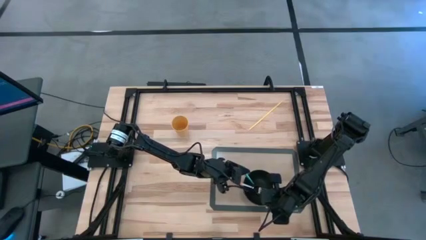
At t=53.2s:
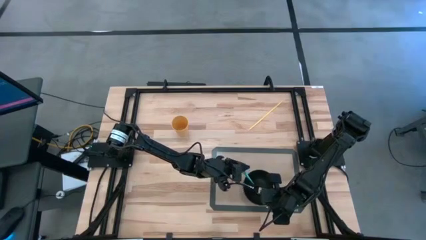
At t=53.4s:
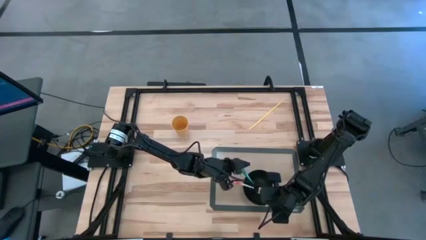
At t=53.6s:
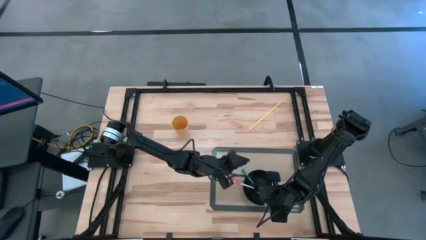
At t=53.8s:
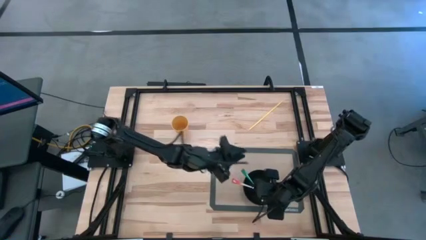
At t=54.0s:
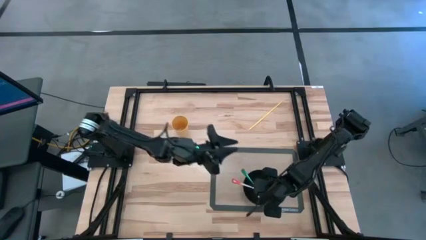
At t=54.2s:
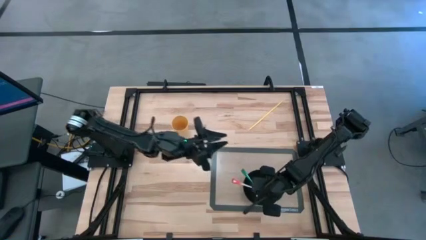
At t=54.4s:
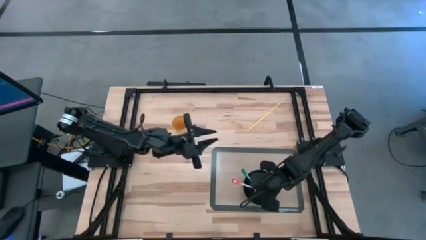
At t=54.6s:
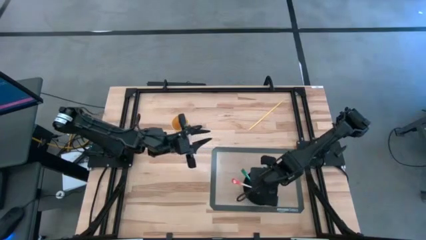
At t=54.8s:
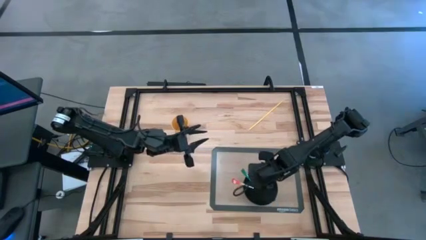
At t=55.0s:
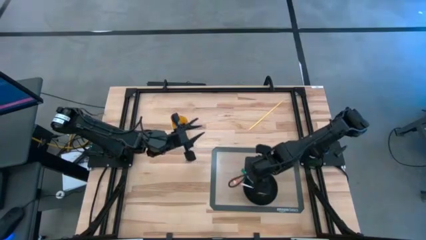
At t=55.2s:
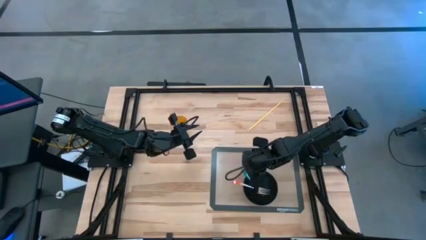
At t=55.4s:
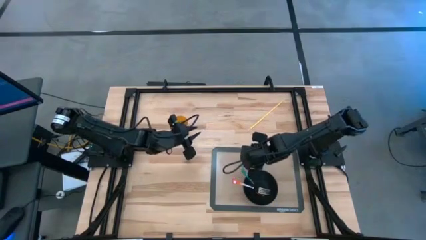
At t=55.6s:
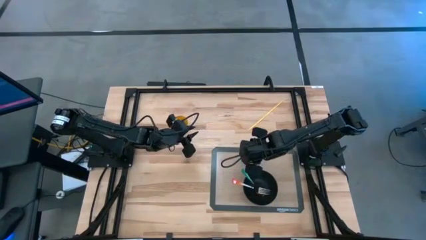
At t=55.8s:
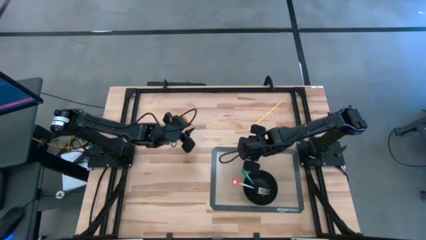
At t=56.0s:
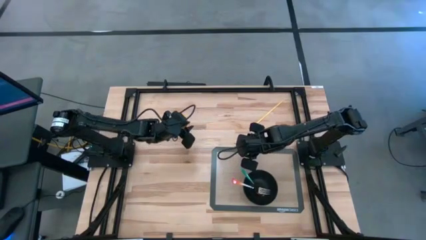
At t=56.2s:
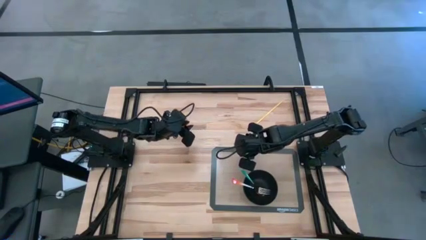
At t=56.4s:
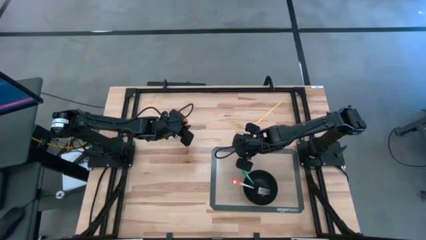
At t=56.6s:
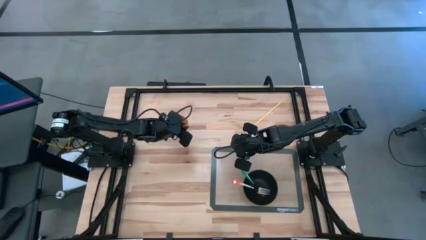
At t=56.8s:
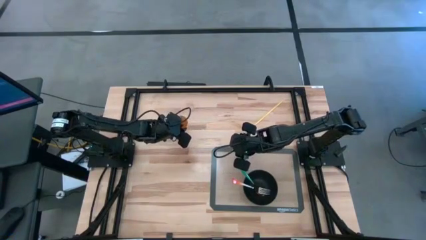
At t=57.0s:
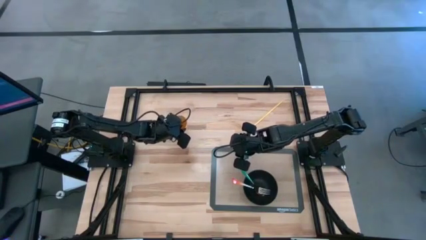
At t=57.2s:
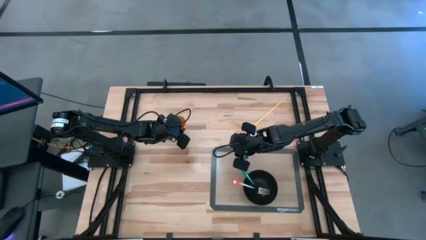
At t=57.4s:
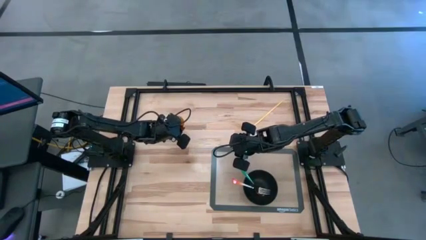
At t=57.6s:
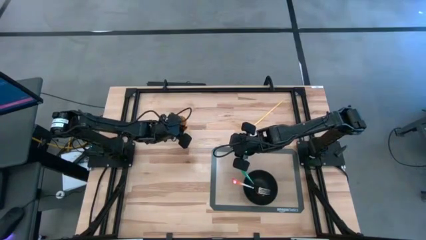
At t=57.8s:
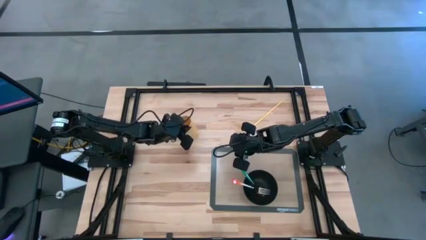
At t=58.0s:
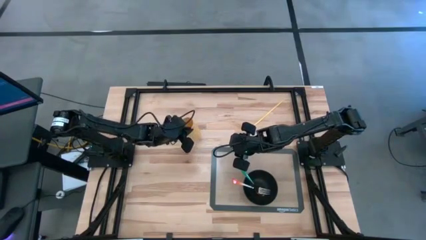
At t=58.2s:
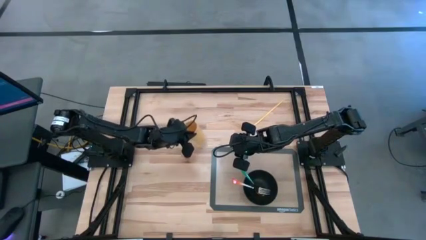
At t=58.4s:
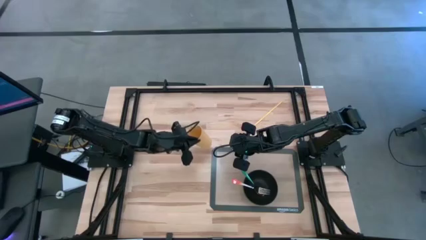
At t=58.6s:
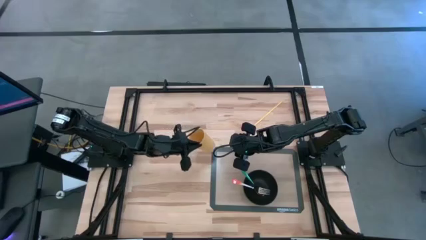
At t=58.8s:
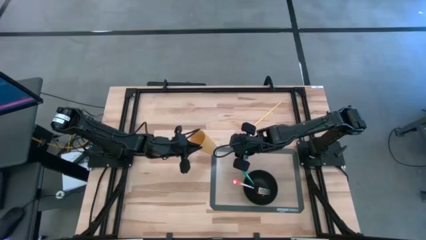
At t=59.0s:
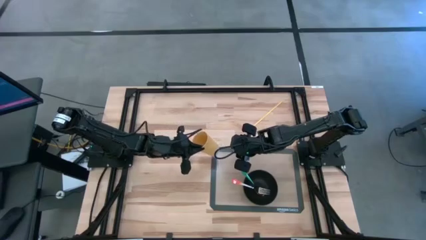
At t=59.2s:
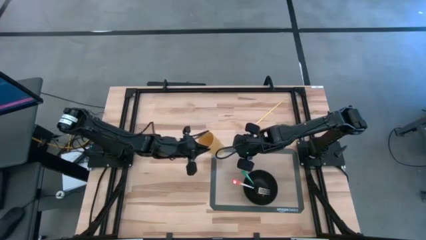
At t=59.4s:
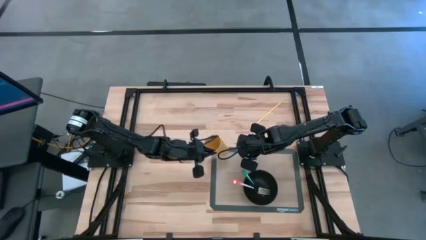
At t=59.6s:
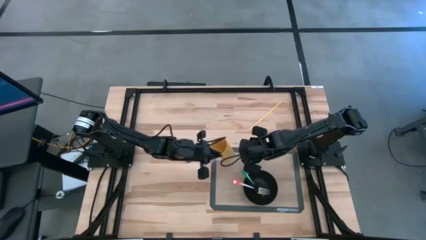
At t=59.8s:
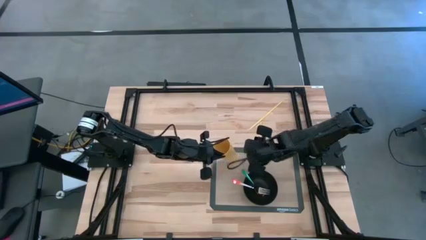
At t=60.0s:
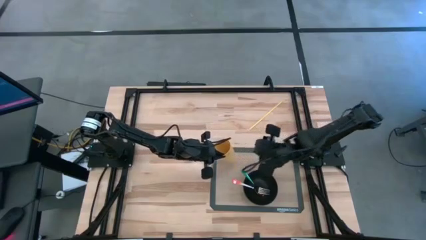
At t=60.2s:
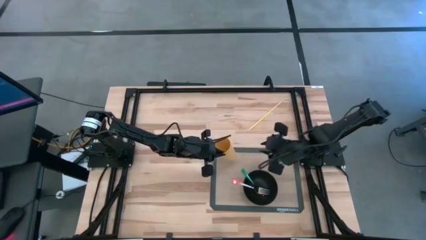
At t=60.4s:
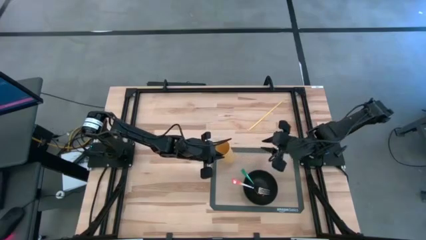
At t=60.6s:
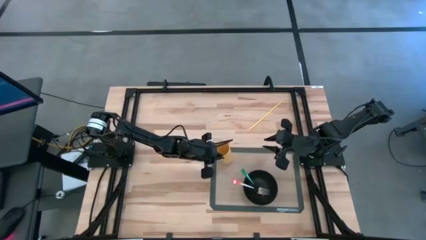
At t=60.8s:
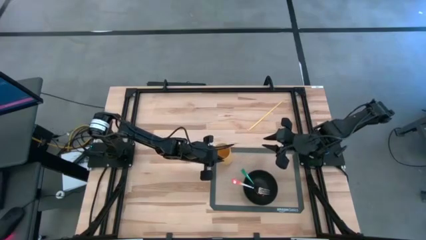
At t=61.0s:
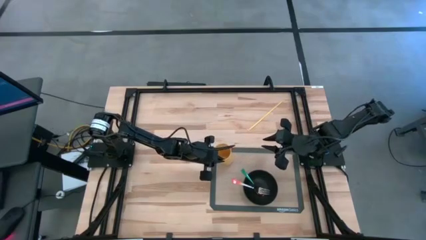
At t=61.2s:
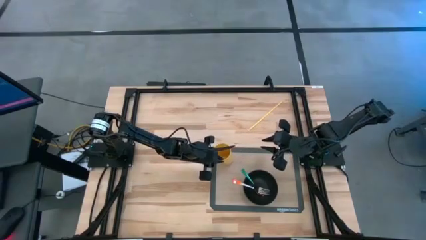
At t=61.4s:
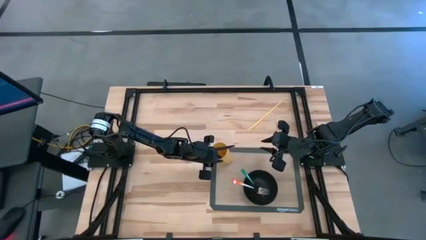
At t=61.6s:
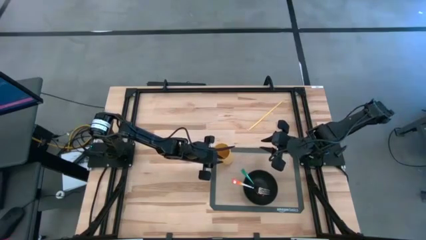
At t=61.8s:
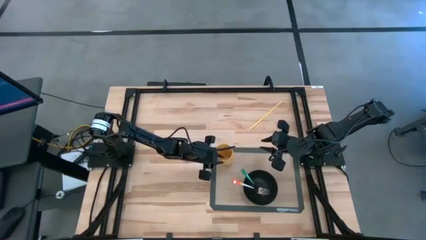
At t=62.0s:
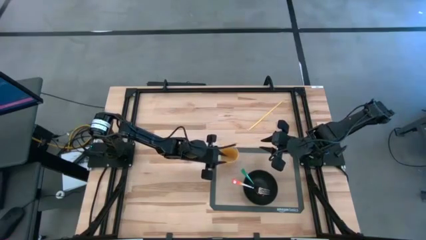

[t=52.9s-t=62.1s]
Task: Pick & Place Utensil
Put the yellow cup on top of the black bowl on the table placemat

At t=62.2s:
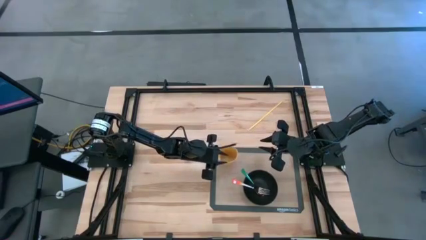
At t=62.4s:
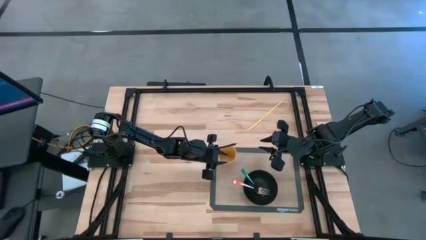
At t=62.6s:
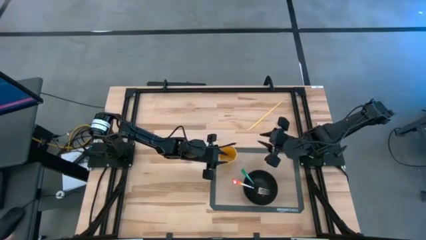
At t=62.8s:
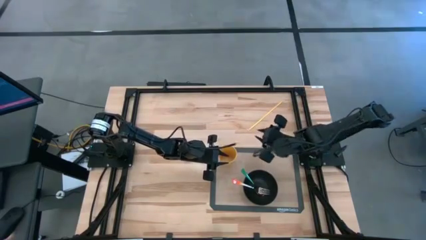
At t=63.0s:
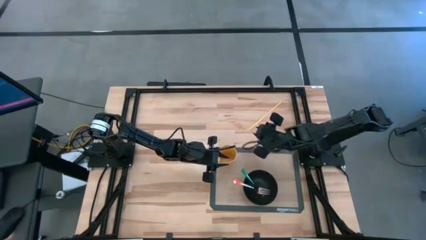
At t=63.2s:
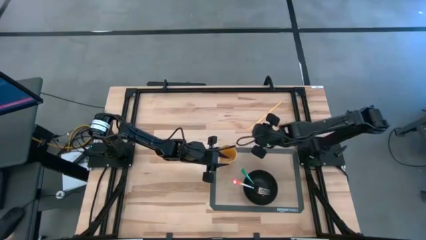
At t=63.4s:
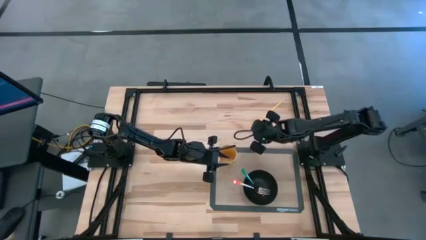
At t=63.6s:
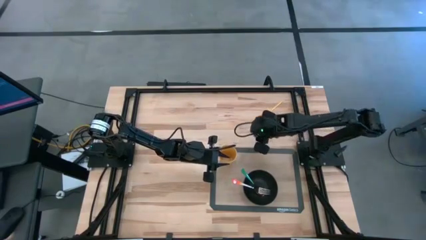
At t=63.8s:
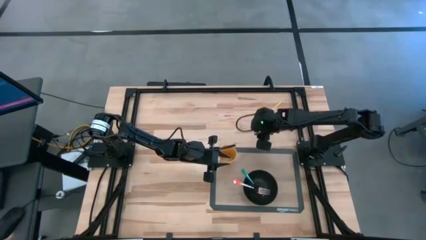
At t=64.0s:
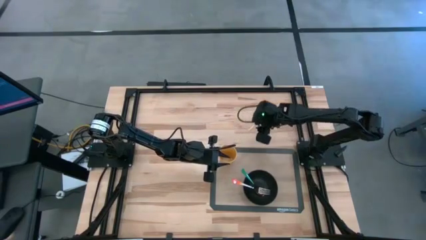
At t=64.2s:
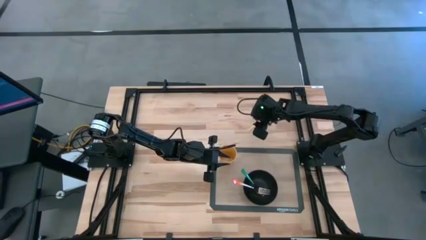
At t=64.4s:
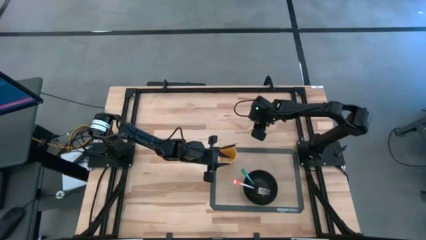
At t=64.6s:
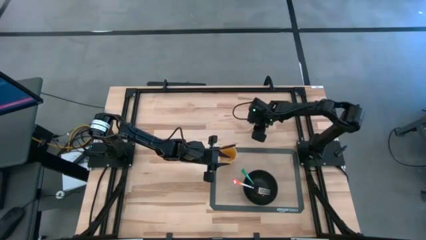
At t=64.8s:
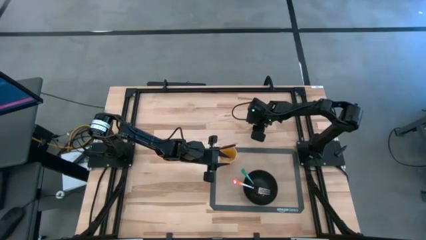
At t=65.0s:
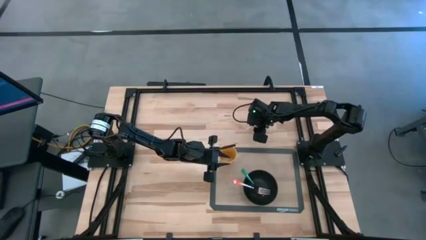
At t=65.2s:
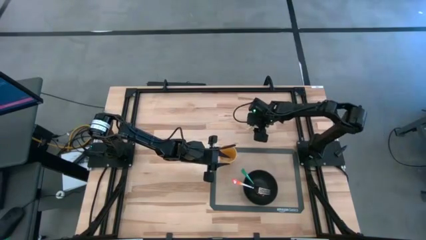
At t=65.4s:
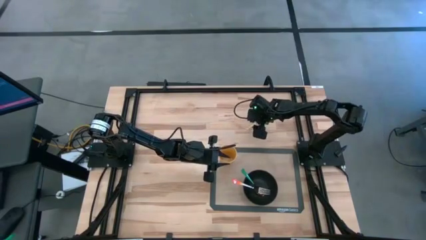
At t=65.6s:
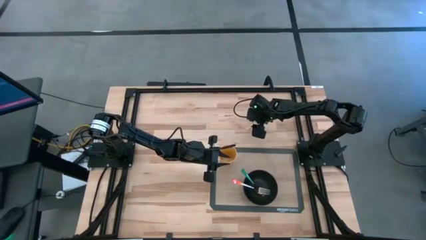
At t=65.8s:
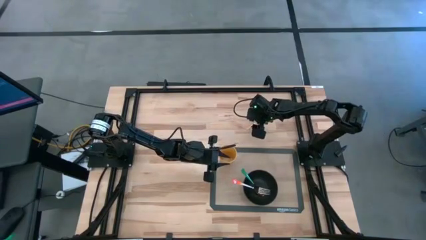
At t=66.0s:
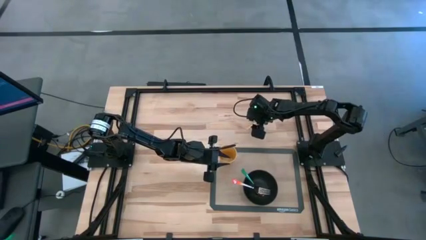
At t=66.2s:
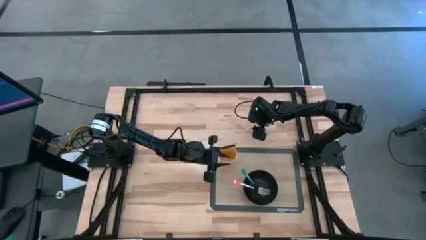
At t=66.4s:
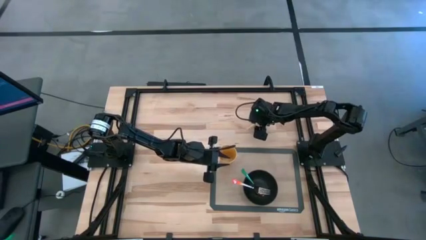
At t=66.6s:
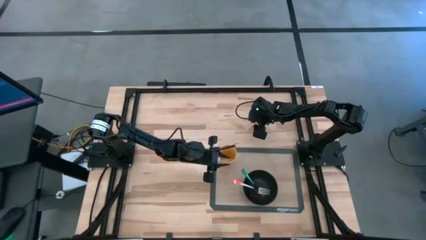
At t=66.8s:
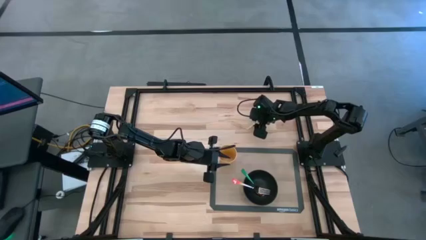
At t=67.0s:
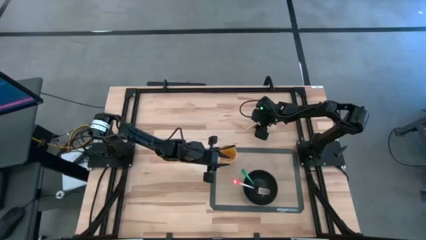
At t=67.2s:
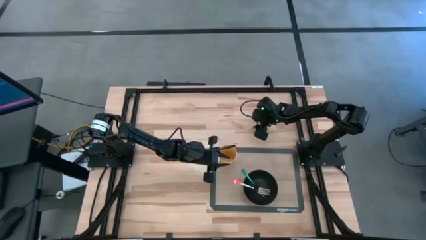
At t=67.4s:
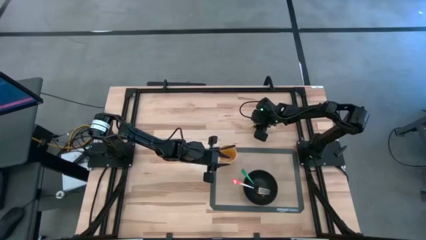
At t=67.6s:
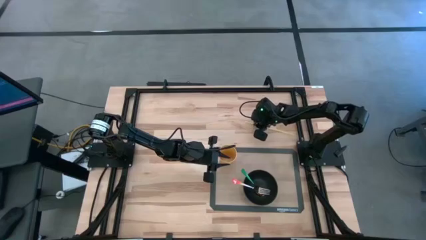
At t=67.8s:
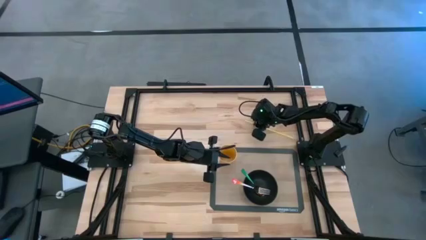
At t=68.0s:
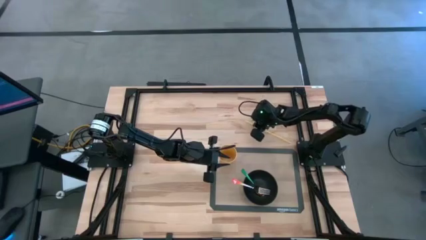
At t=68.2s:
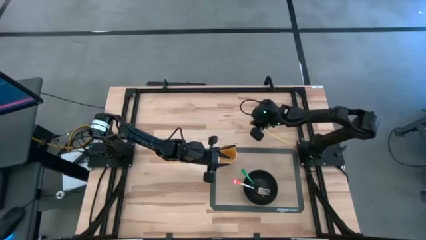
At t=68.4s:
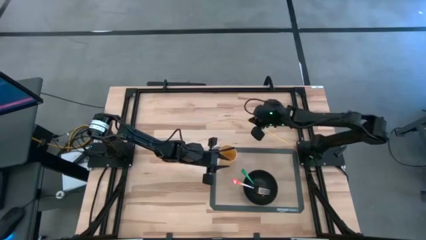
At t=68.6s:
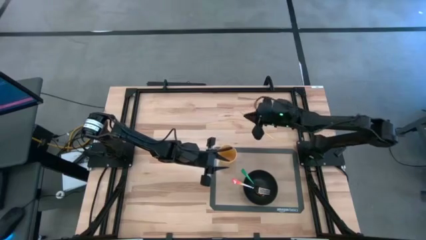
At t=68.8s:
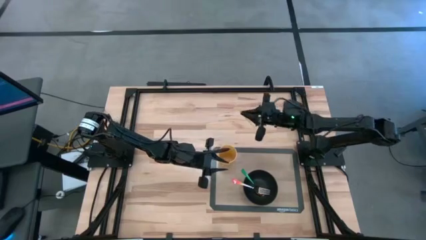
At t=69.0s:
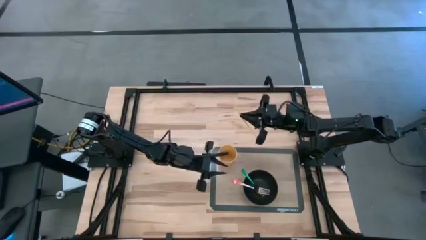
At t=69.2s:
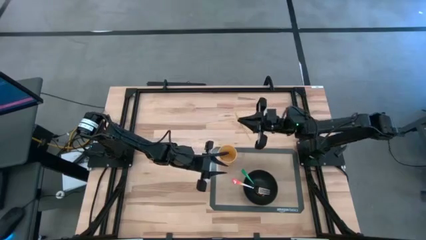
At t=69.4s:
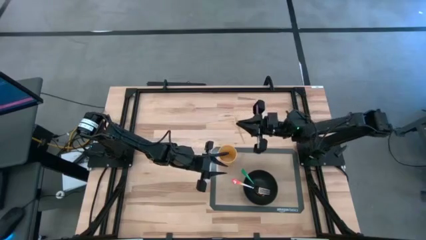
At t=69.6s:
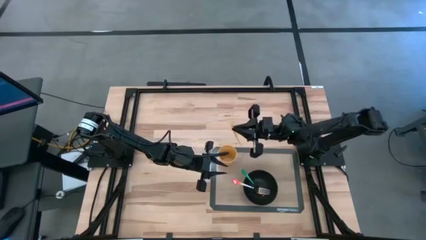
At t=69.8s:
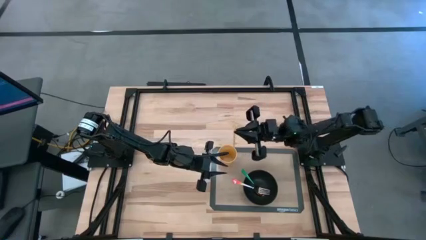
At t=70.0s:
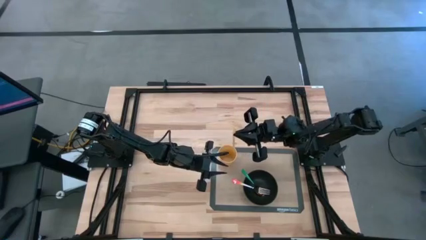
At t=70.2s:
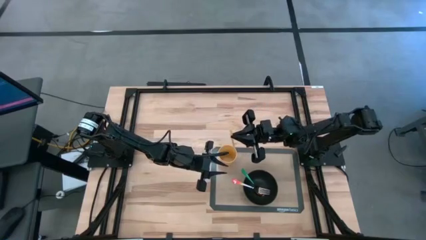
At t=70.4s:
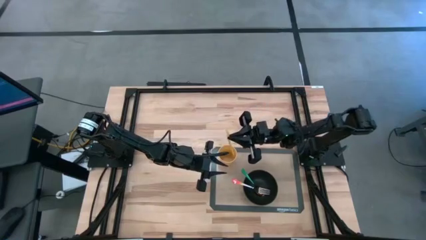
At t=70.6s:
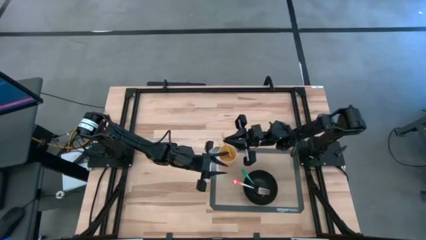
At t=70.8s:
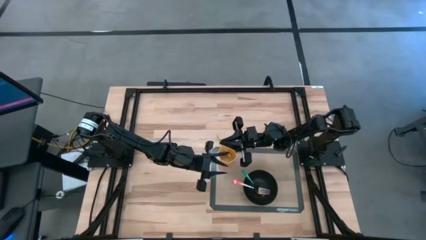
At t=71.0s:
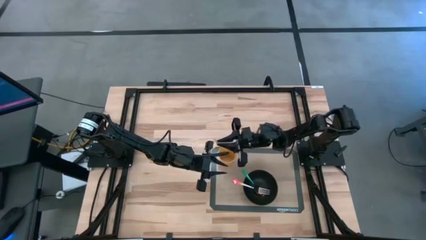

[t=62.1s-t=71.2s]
Put the yellow straw into the yellow cup on the table placemat
